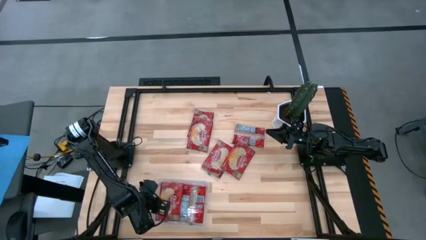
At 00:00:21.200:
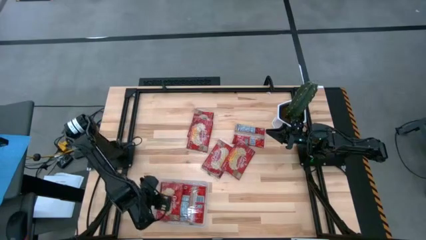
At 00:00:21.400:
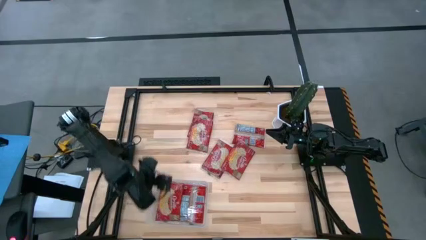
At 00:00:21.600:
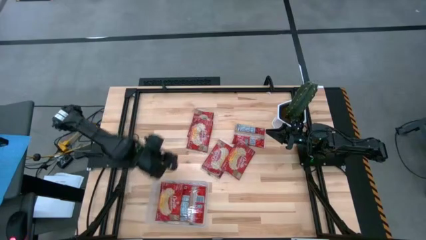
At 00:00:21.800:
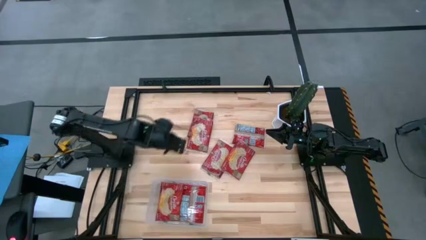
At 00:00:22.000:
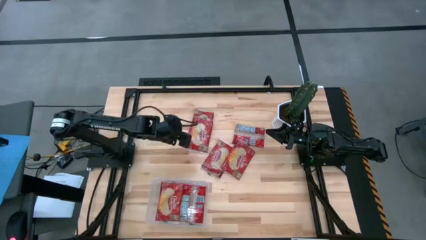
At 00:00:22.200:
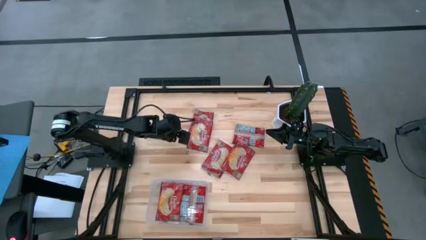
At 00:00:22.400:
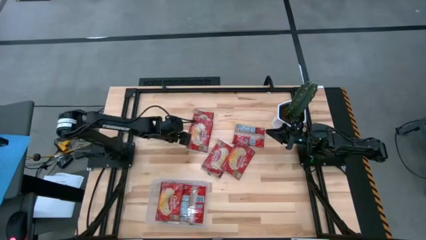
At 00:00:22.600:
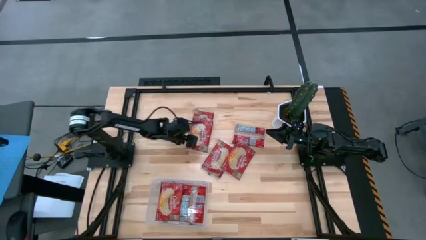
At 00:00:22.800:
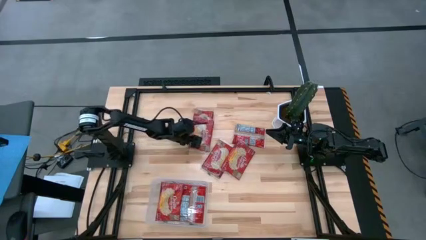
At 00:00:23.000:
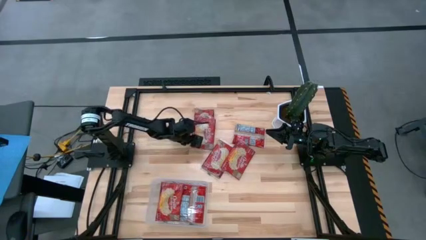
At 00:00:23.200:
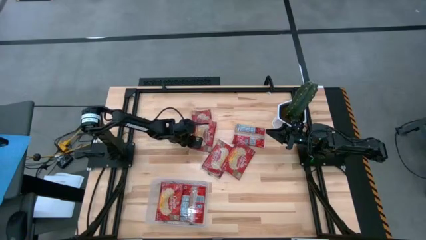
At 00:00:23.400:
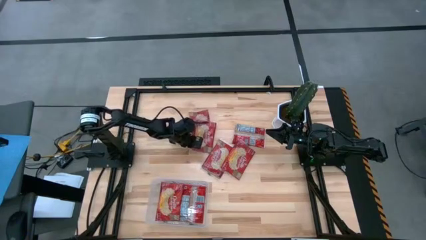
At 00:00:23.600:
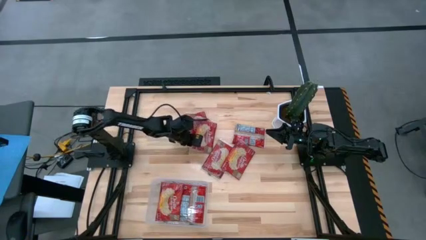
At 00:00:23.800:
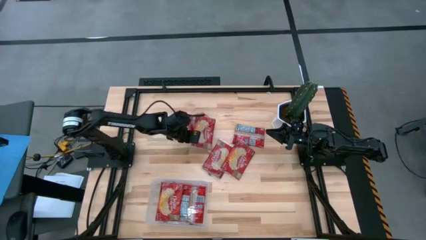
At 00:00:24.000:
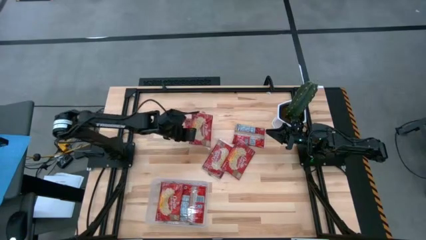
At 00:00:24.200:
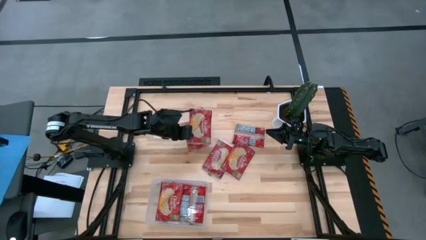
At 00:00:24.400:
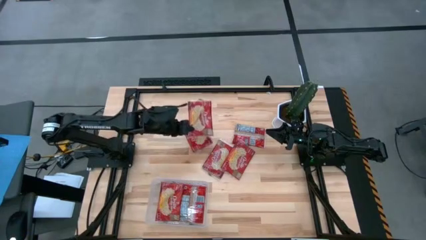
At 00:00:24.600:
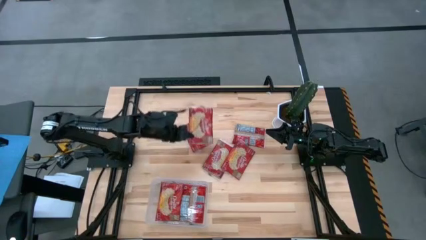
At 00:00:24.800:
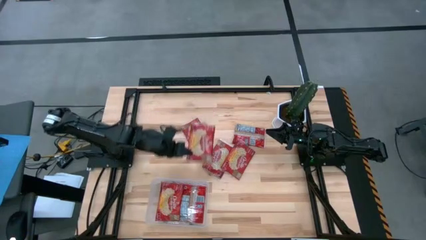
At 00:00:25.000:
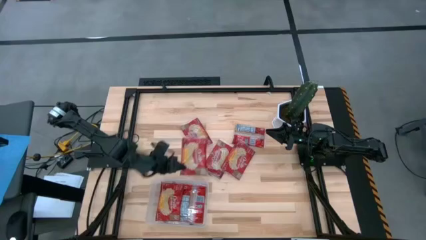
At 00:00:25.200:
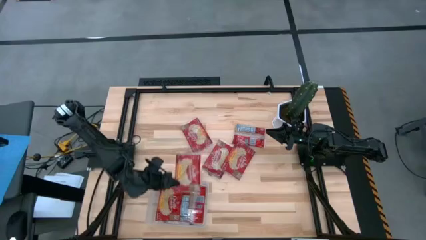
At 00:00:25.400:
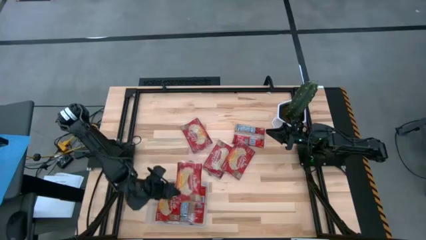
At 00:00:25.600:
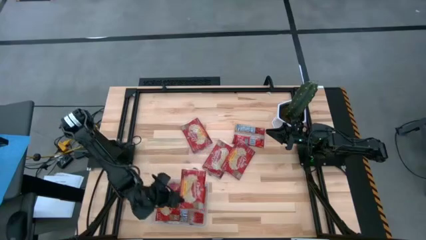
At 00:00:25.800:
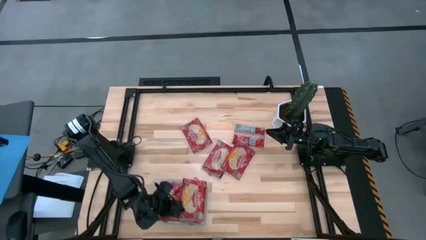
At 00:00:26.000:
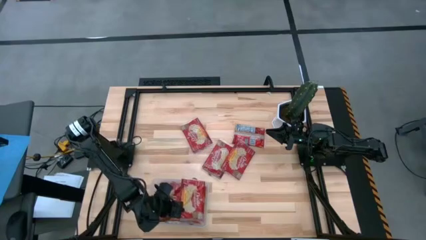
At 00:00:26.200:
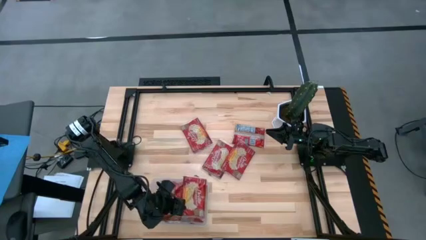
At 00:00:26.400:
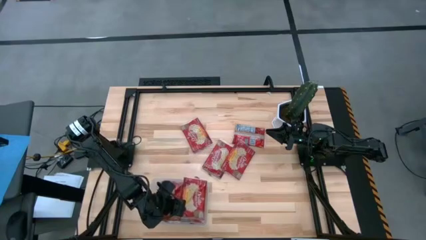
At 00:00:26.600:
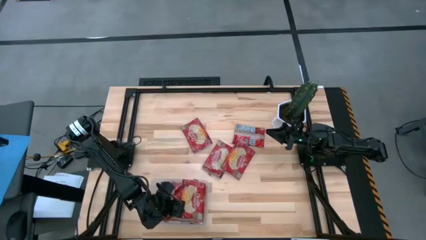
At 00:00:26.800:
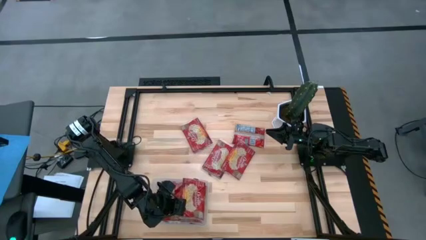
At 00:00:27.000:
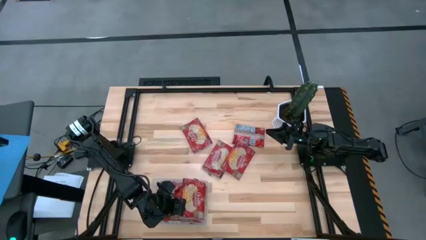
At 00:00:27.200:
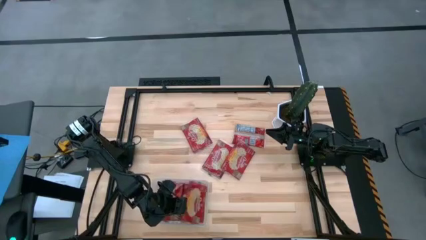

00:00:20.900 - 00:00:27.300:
Task: Sort popcorn bags into baskets
Put the popcorn bag into the transparent bin

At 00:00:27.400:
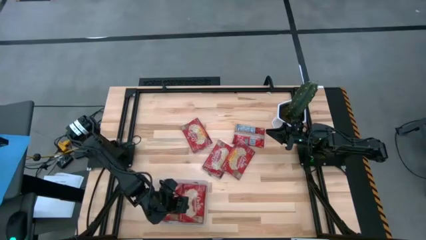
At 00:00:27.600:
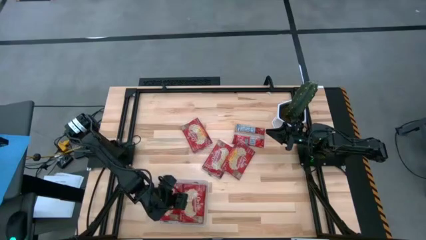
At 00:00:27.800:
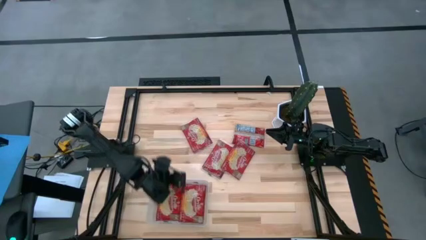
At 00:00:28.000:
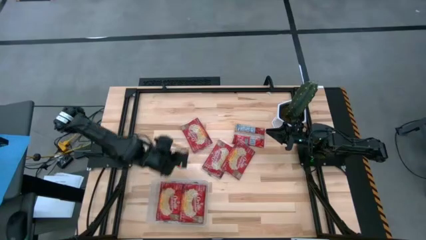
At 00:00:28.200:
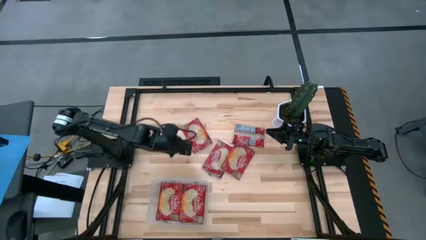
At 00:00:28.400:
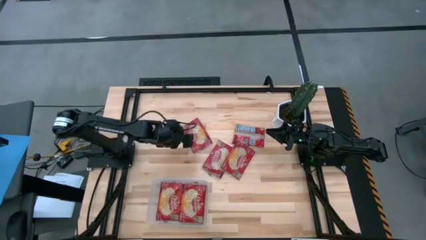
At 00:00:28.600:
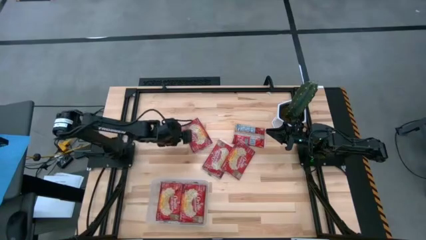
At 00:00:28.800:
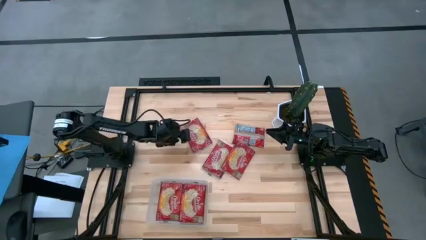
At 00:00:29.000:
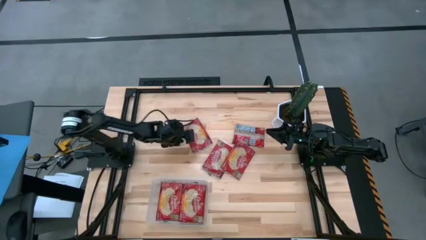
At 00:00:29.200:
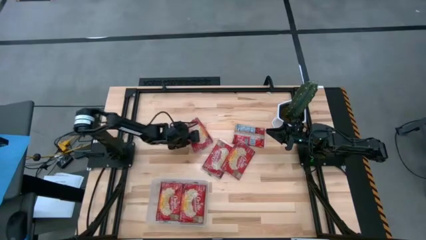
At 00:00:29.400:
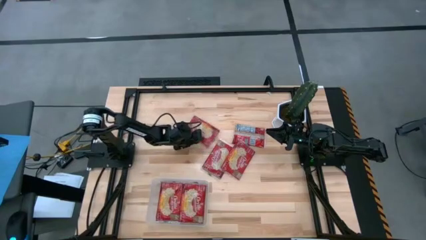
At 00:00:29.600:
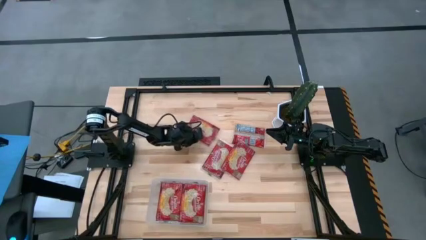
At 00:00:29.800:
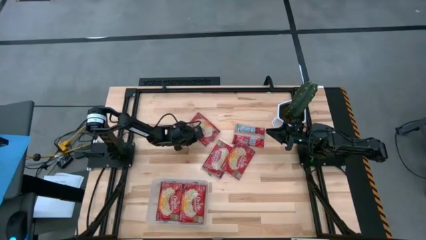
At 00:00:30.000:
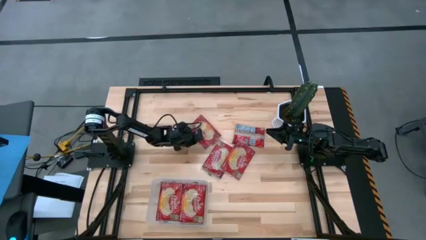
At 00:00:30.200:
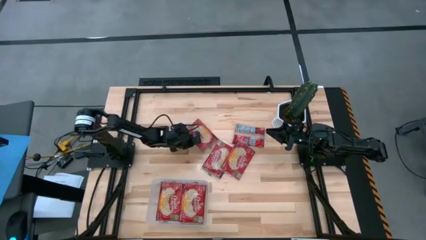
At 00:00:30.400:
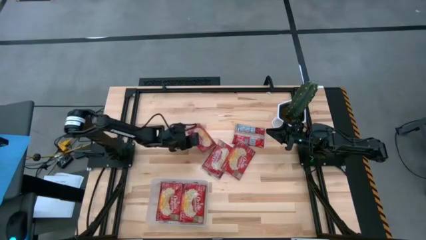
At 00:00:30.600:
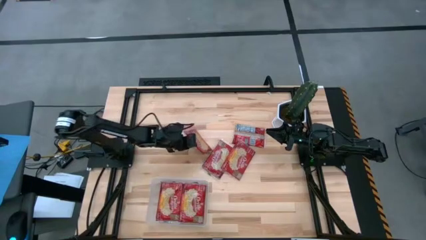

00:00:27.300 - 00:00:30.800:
Put the popcorn bag into the transparent bin

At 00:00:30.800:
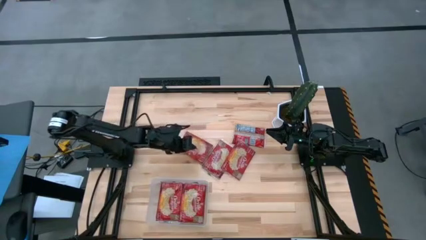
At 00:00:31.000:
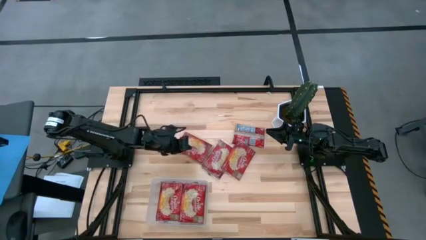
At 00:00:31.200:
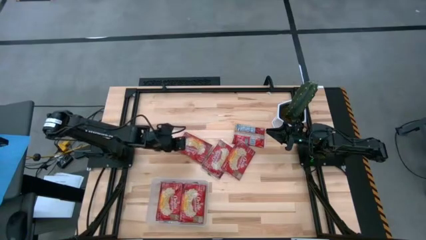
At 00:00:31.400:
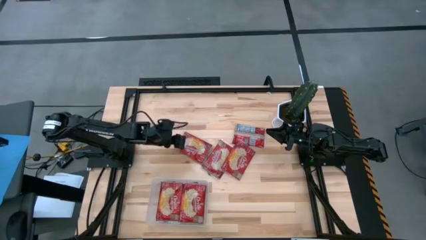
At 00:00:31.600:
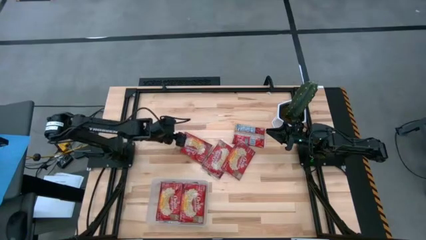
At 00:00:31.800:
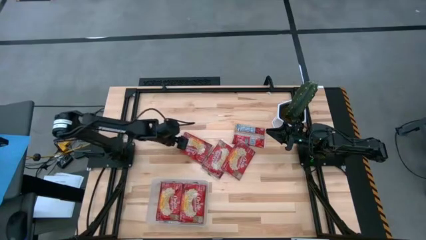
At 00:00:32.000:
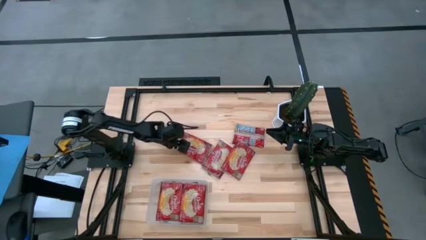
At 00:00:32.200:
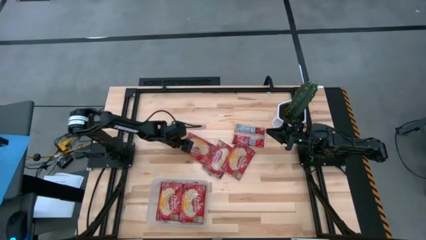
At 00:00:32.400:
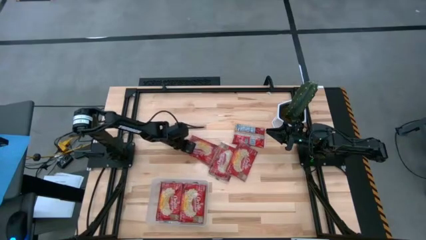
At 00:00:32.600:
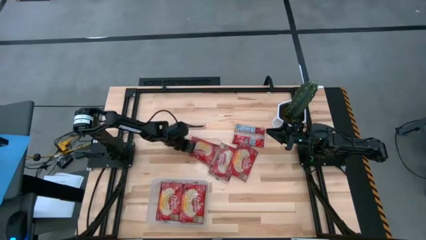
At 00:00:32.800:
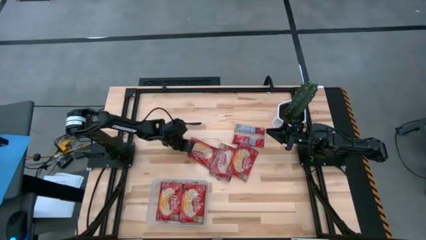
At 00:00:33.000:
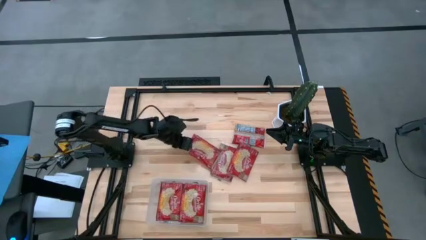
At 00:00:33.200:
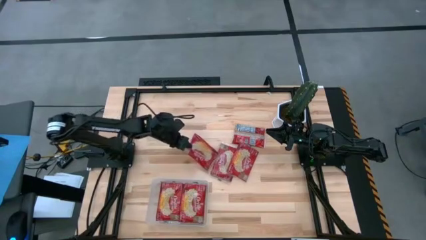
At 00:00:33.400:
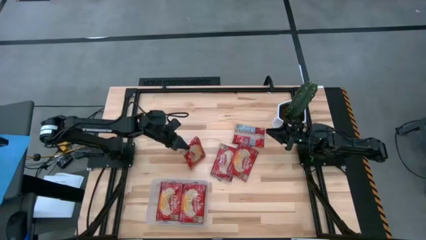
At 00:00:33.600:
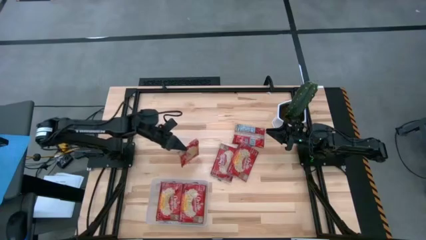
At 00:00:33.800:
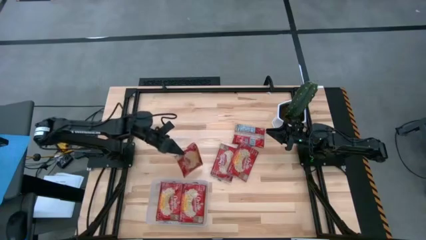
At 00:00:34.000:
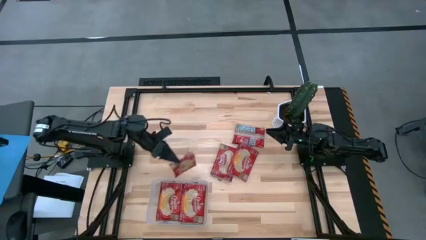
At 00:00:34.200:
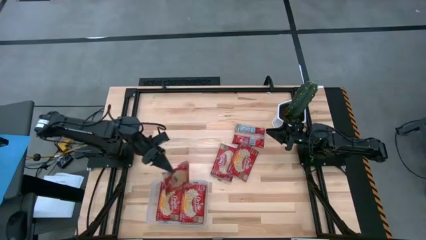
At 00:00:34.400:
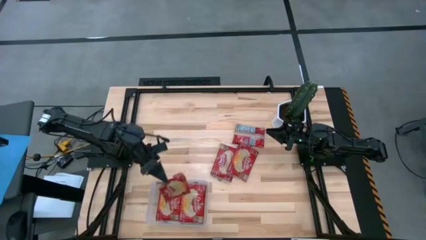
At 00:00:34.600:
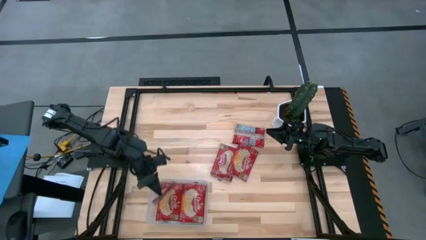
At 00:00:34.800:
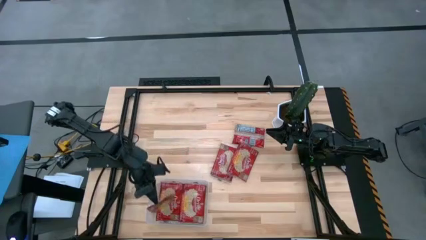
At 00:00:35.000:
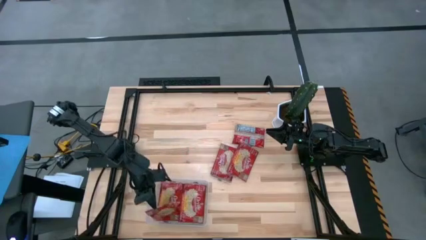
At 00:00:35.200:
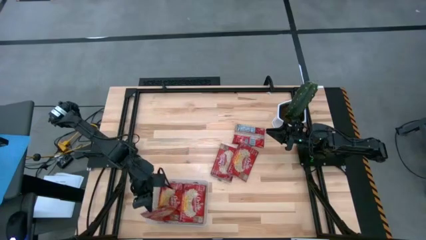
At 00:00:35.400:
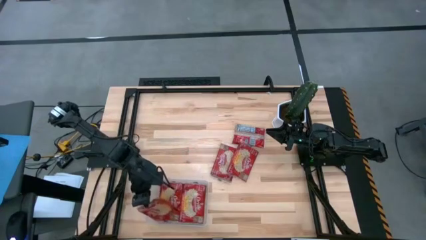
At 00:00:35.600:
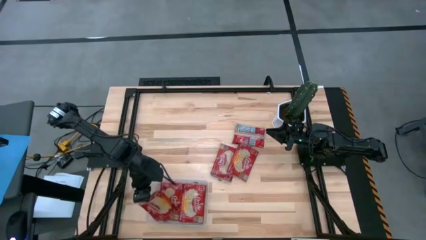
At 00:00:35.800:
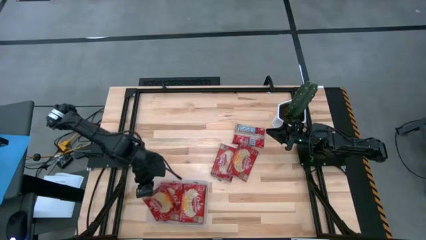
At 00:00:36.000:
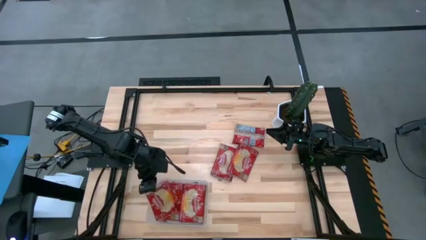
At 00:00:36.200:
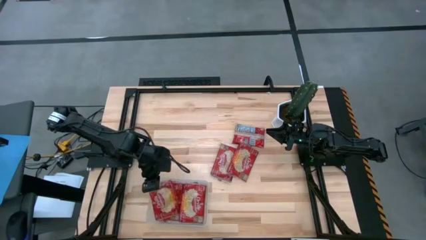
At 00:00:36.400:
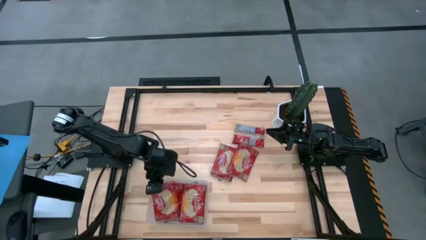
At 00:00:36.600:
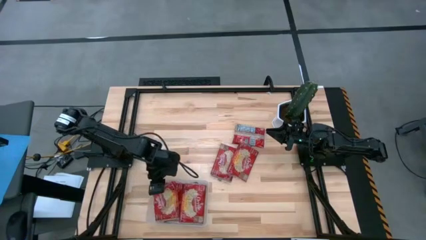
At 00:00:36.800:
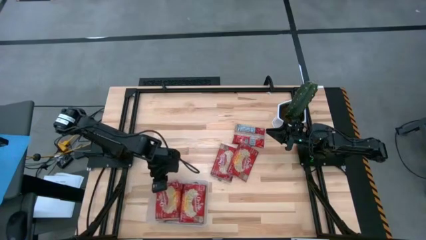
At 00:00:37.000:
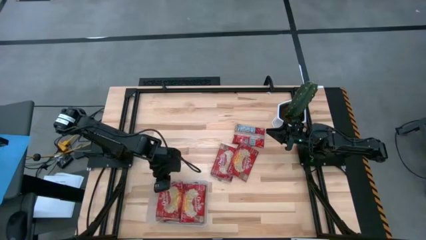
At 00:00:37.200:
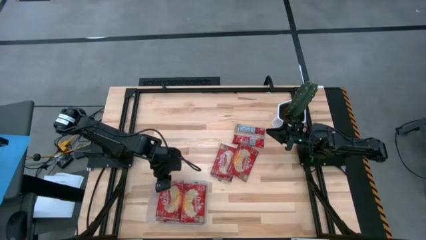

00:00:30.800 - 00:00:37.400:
Put the popcorn bag into the transparent bin
